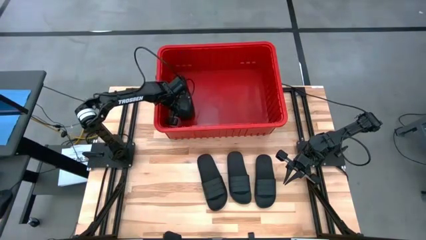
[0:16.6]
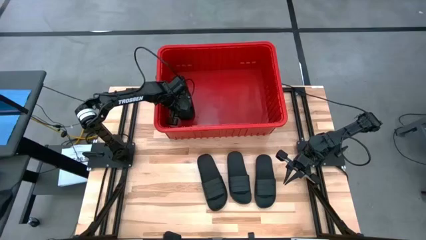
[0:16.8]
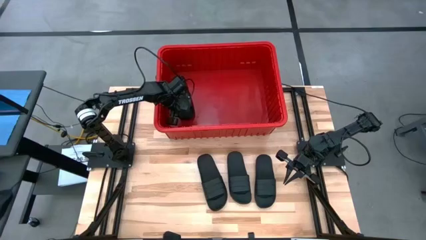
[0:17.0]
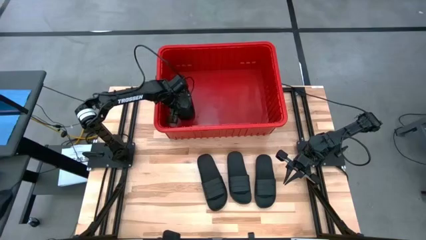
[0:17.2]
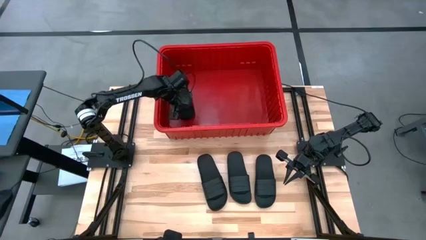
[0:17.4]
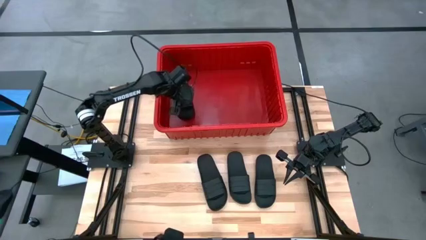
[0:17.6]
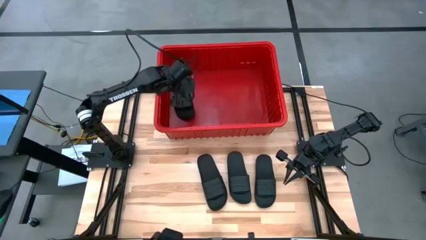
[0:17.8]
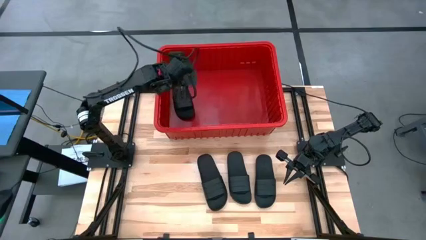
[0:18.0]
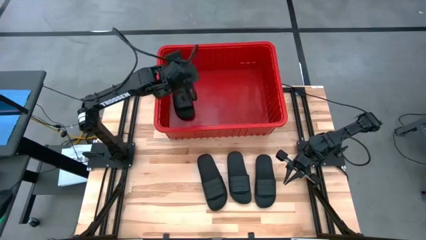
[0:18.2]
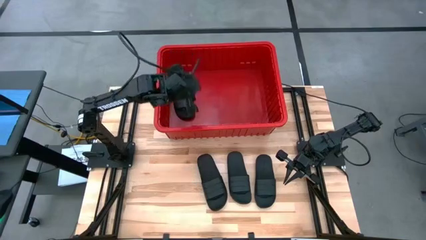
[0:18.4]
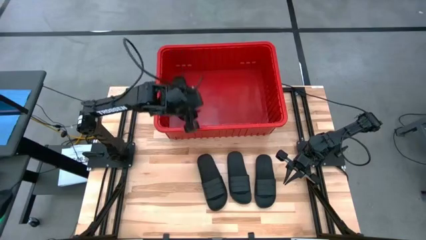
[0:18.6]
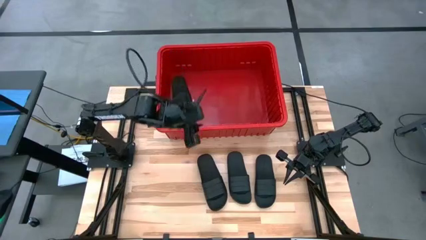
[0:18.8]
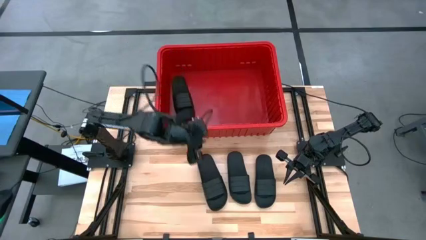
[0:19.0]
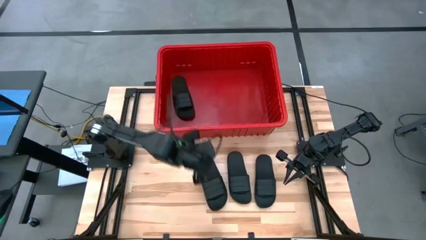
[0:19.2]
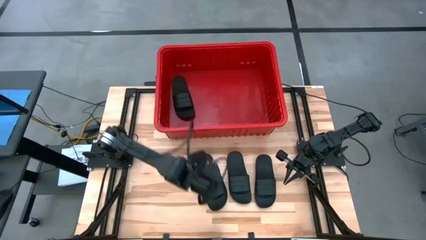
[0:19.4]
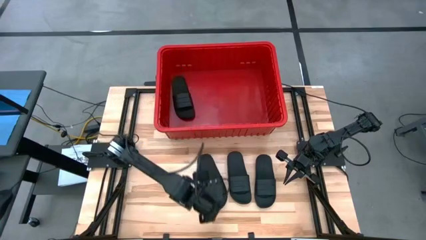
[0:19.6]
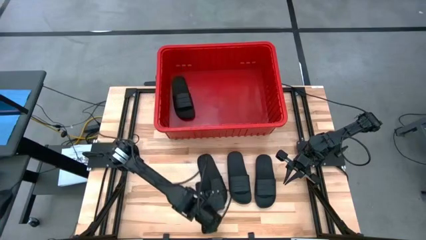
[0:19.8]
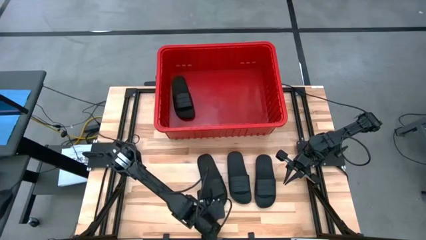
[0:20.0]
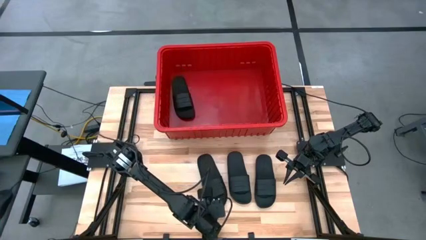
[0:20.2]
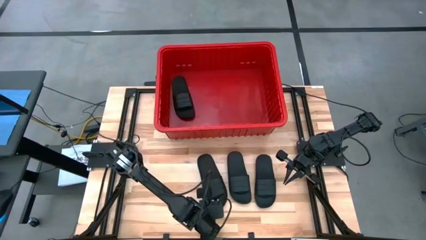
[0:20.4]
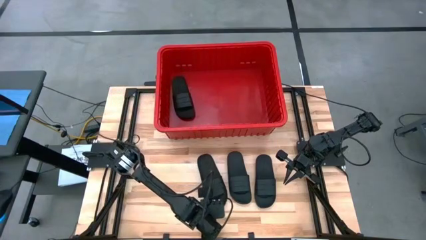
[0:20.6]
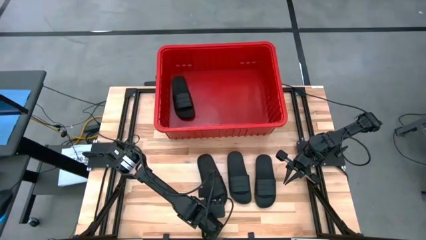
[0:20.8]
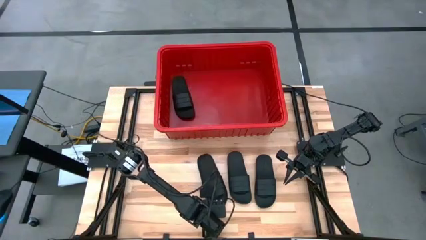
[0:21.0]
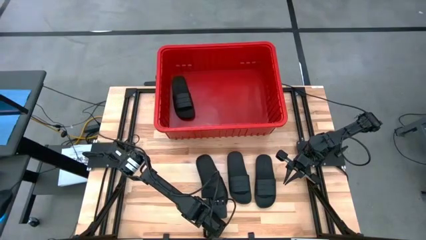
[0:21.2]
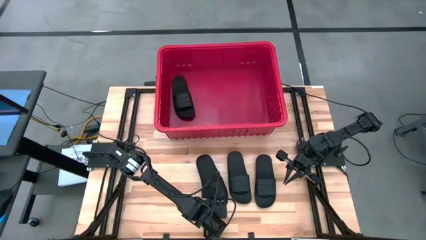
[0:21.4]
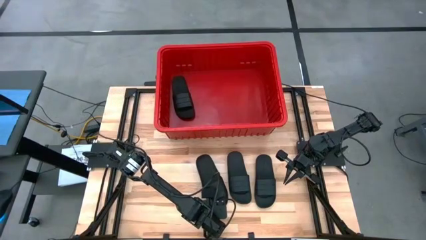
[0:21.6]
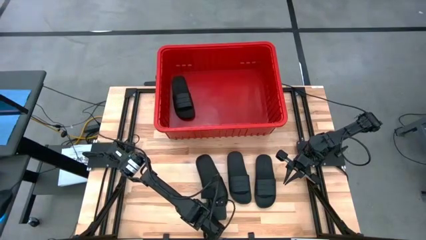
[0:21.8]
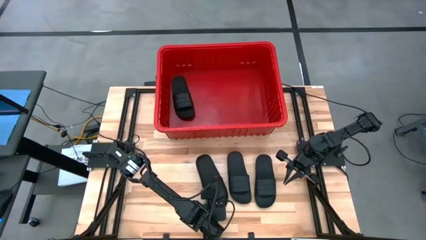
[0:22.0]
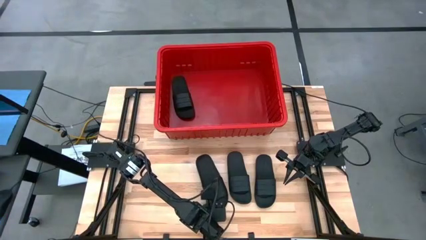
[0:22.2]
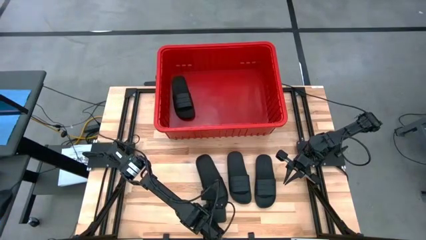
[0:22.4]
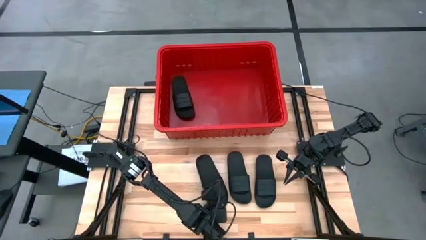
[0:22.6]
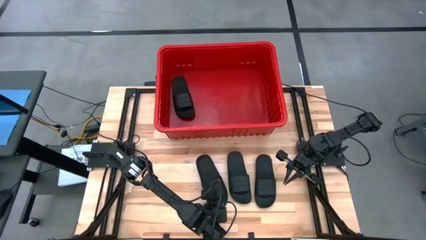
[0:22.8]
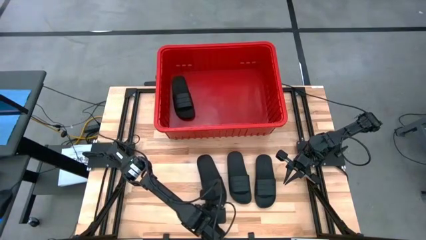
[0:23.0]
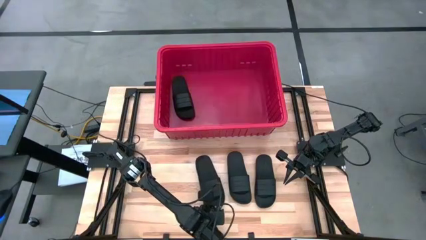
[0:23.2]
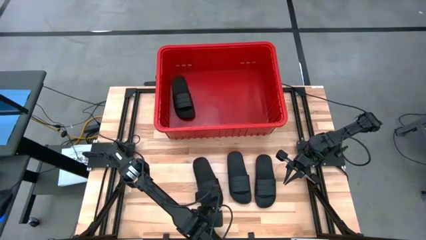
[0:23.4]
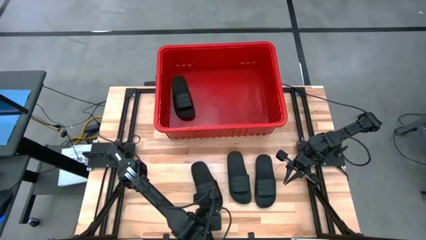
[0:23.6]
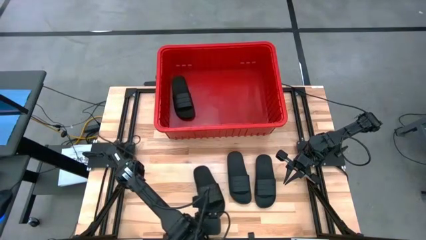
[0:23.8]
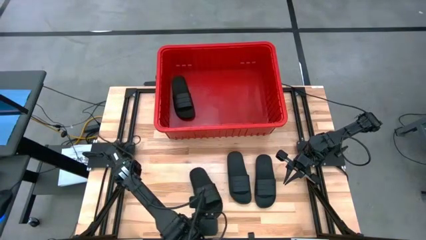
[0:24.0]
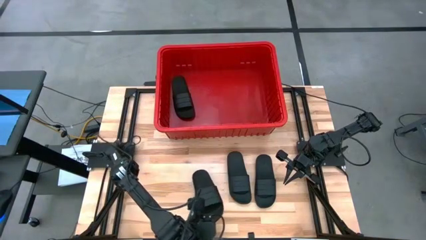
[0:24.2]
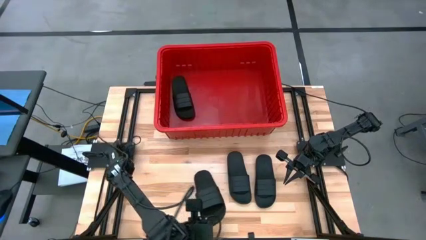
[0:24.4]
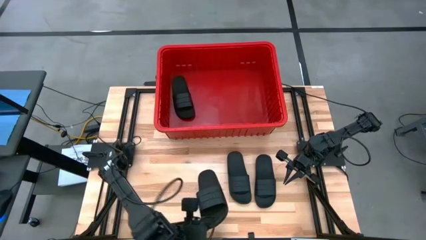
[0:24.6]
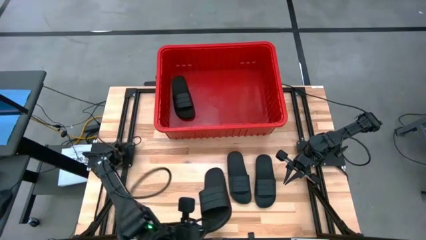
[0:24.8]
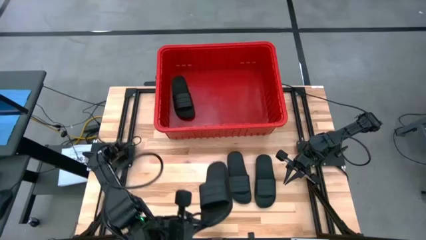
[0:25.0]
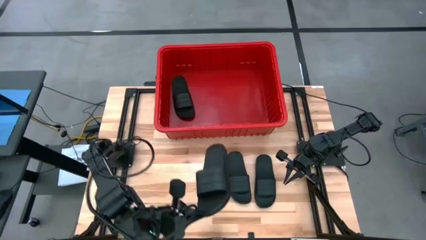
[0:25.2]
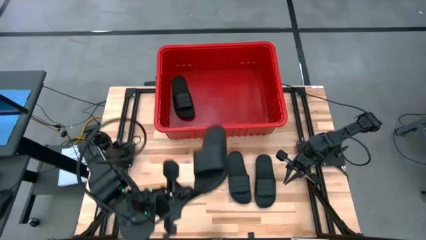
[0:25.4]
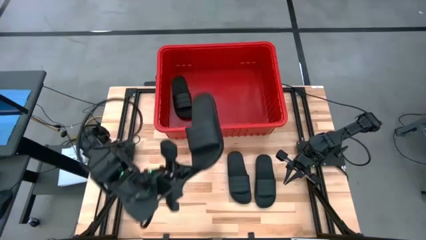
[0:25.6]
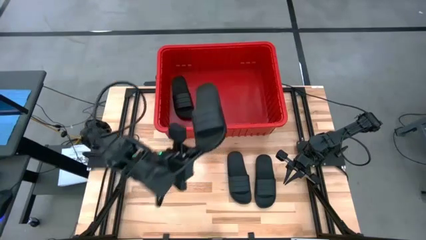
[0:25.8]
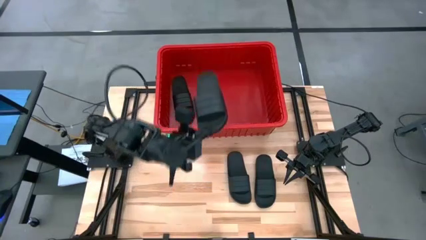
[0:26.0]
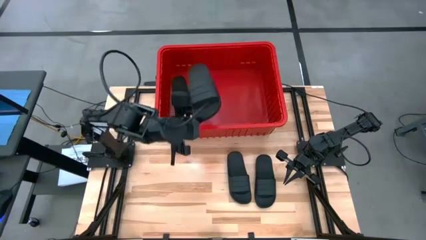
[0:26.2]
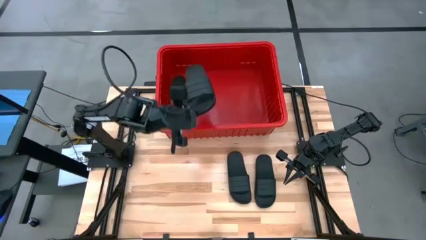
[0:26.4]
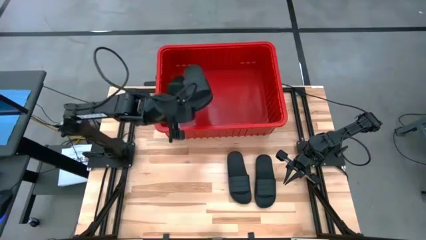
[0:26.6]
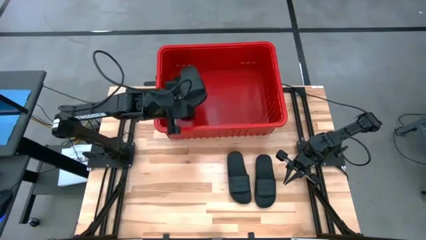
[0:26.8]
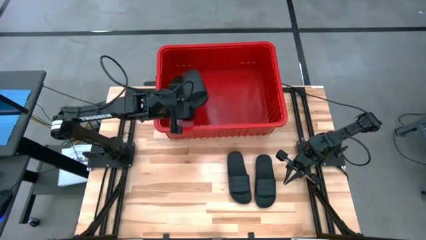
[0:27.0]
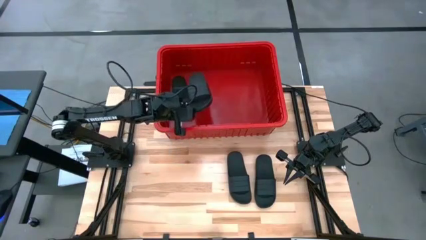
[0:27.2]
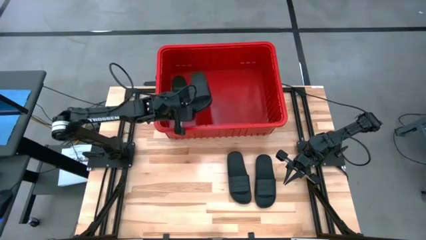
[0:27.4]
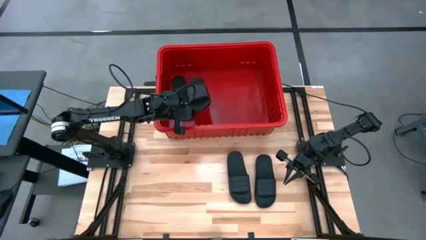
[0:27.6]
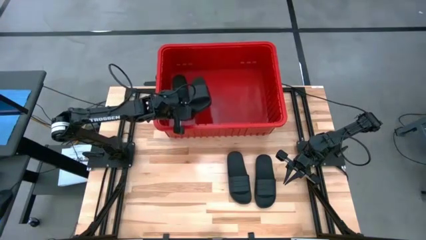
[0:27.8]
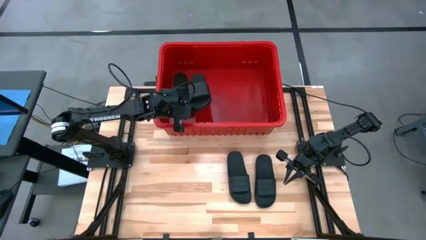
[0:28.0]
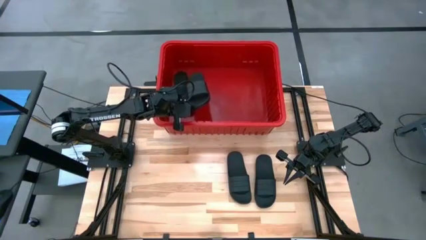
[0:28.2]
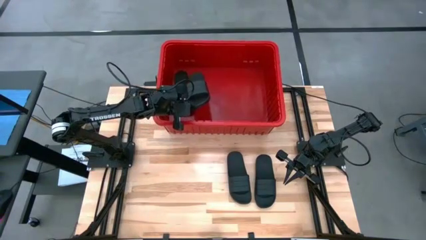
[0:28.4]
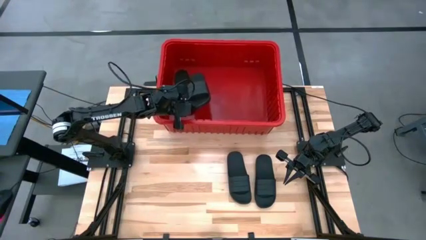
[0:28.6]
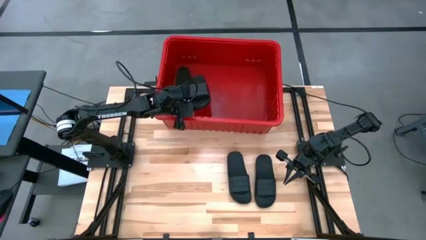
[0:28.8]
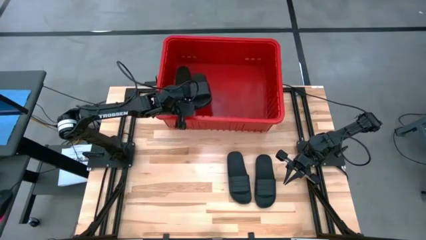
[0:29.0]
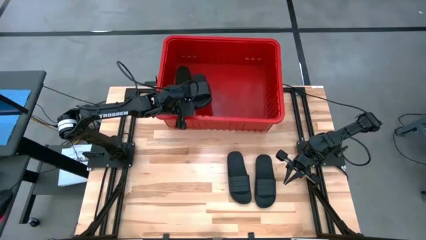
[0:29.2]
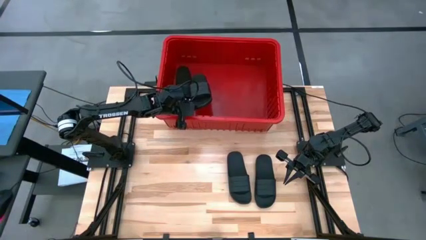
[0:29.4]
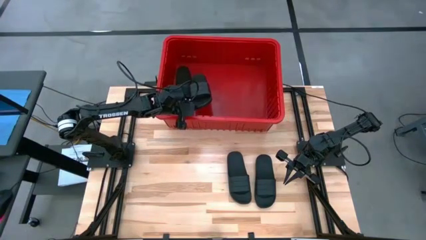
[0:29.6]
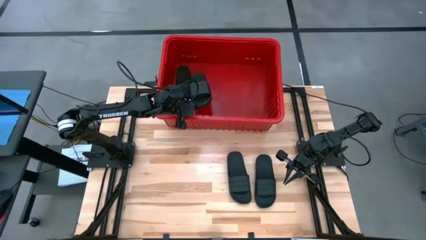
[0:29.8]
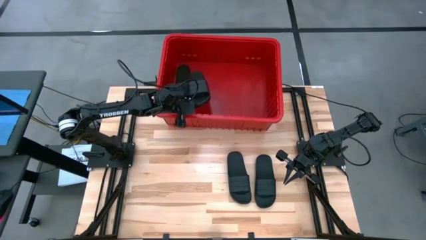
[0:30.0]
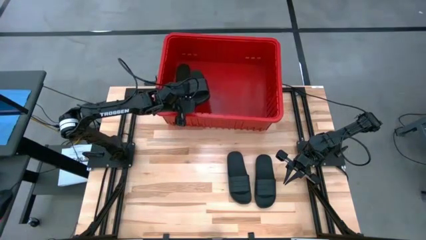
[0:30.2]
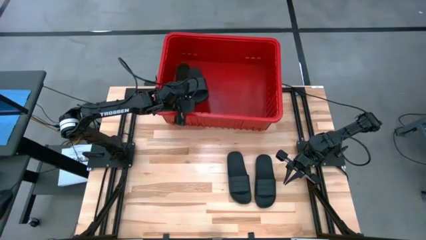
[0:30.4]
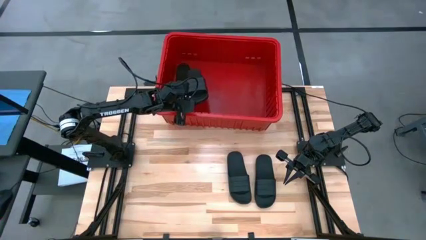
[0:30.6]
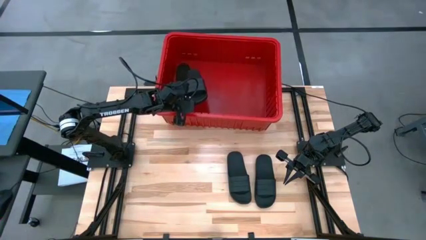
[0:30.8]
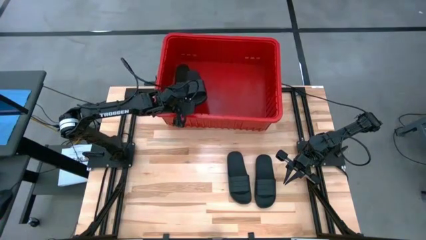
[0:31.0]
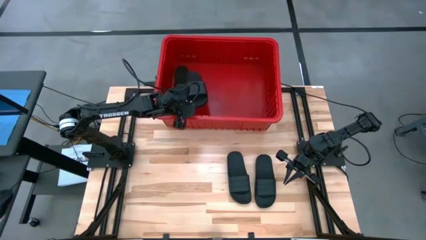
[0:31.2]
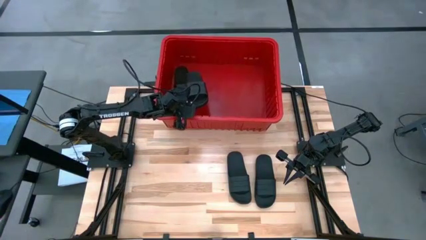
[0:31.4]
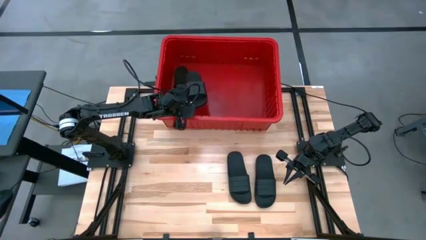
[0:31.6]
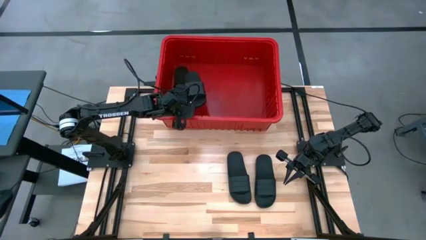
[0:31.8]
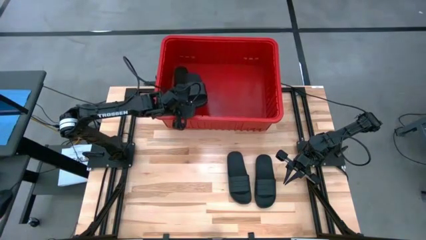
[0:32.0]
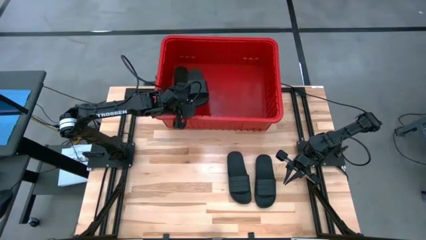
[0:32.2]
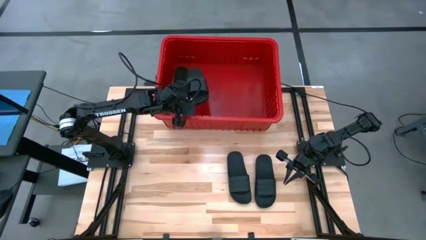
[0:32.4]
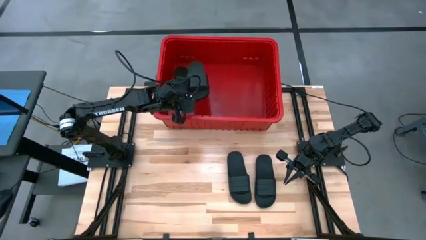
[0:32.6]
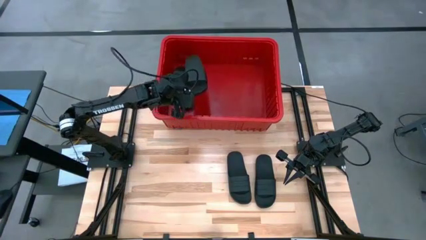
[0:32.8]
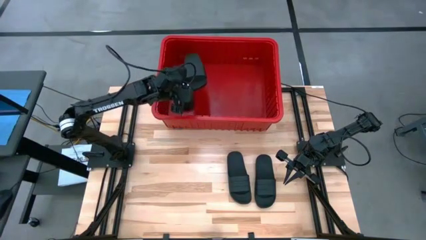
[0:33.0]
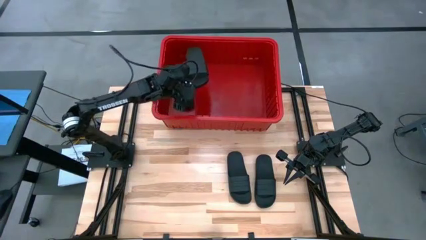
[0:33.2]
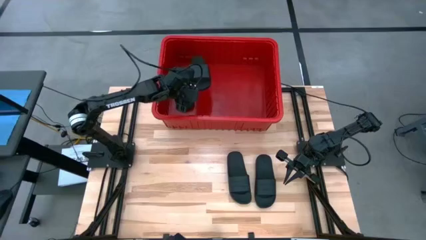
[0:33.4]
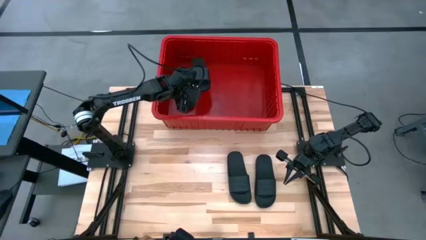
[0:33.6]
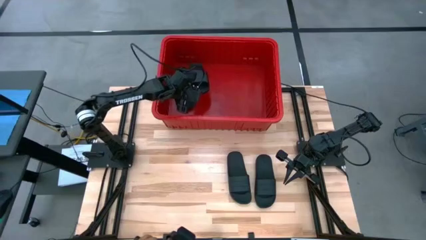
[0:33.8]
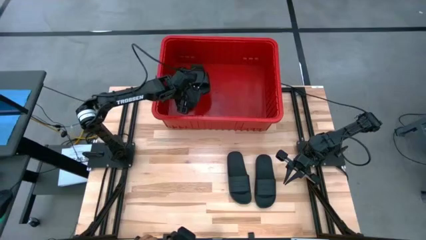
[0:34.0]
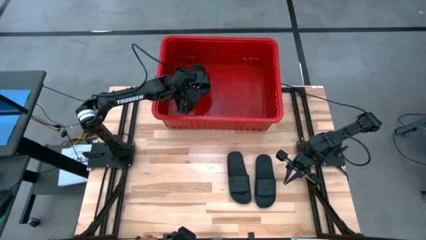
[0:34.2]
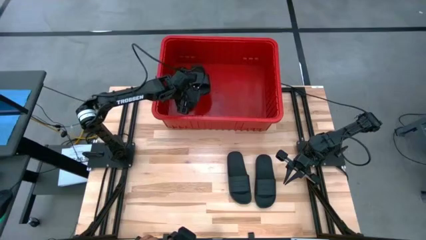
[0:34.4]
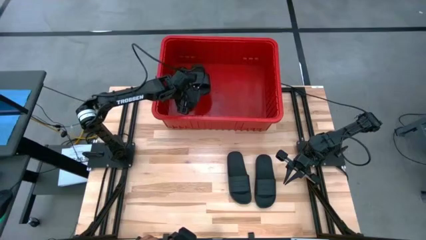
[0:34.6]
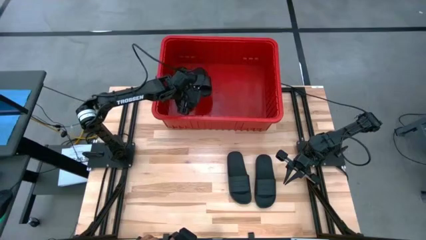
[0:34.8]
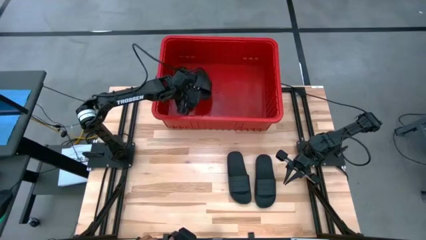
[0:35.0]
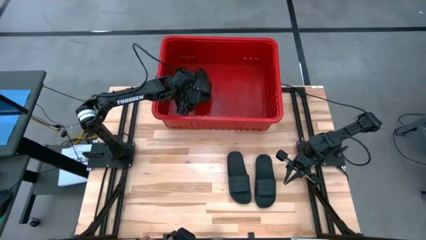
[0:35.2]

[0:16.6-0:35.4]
Task: Pick and place slides into bin
Put the black slipper into the red container
